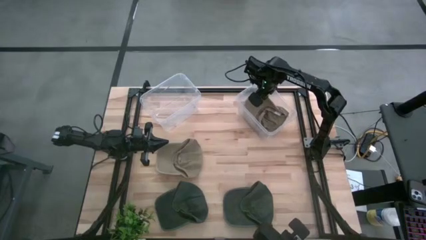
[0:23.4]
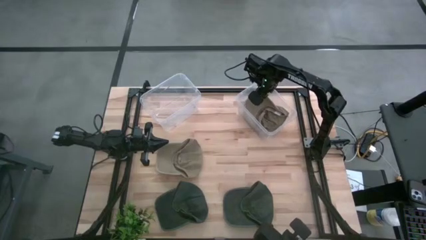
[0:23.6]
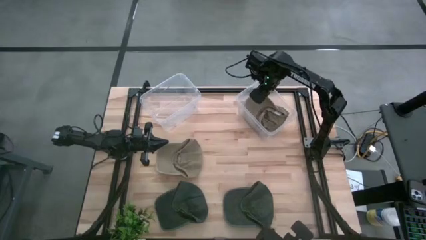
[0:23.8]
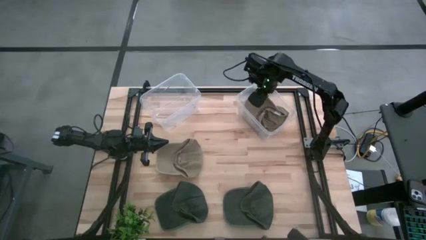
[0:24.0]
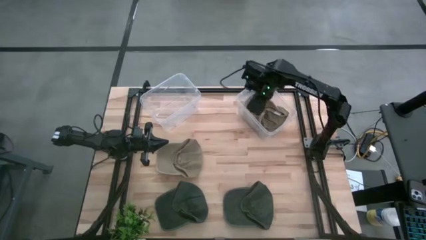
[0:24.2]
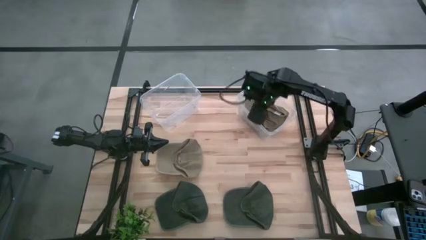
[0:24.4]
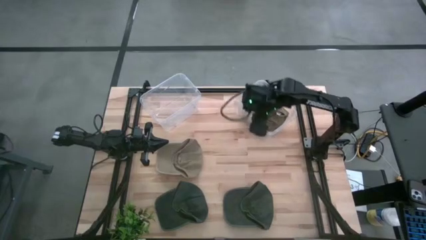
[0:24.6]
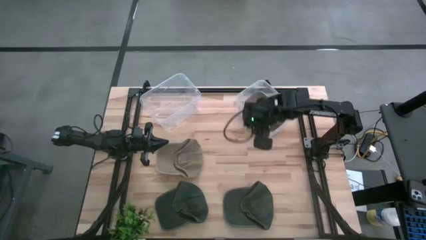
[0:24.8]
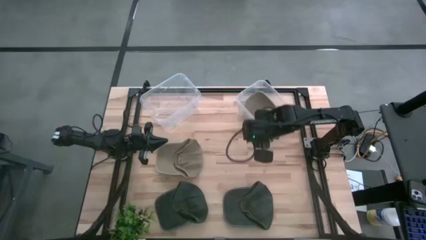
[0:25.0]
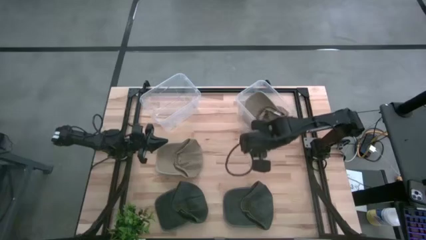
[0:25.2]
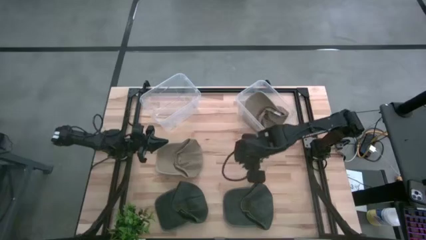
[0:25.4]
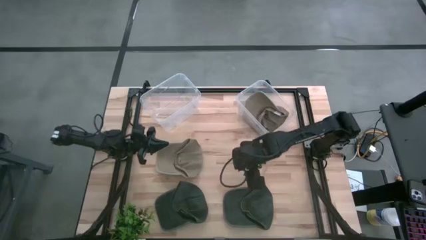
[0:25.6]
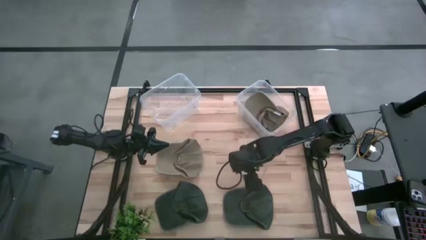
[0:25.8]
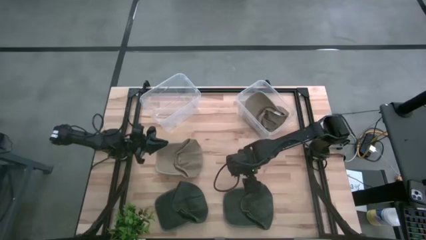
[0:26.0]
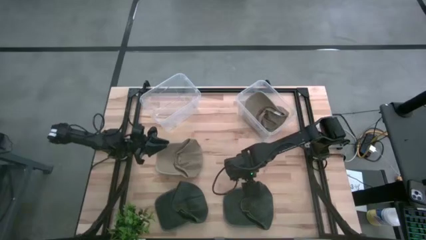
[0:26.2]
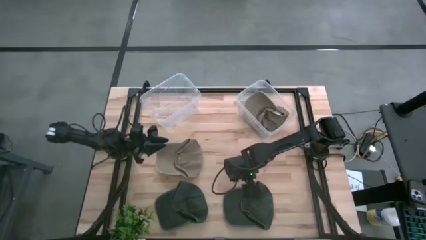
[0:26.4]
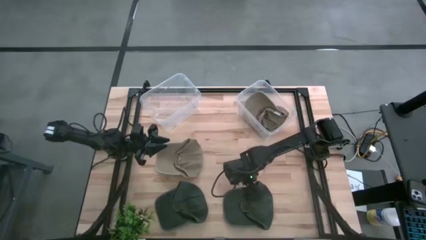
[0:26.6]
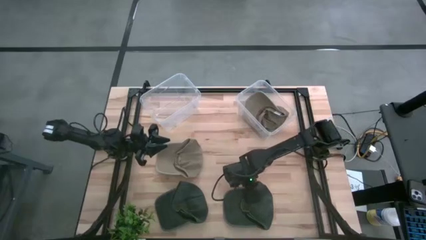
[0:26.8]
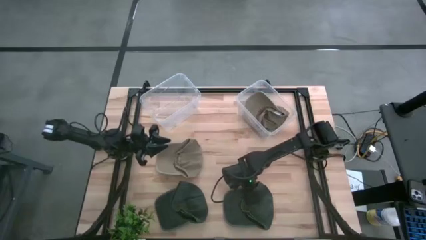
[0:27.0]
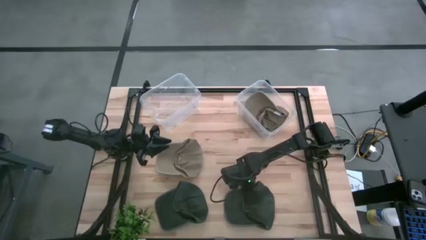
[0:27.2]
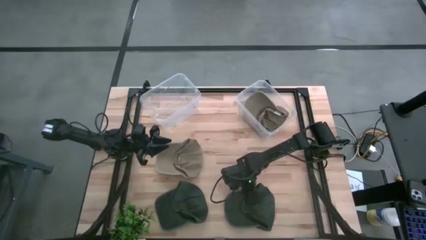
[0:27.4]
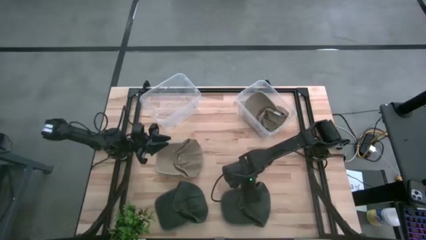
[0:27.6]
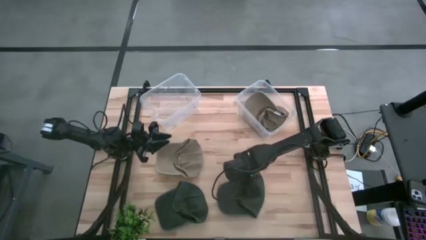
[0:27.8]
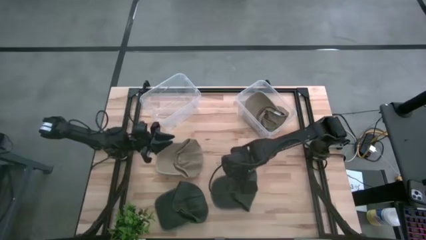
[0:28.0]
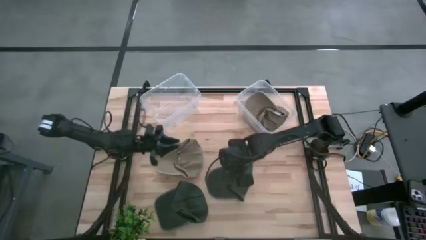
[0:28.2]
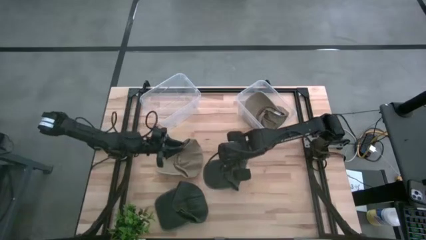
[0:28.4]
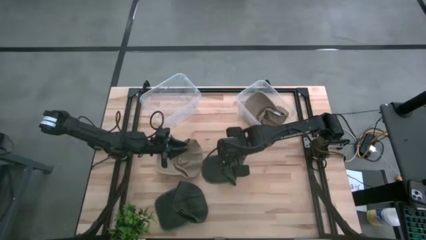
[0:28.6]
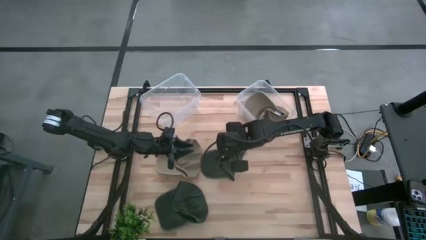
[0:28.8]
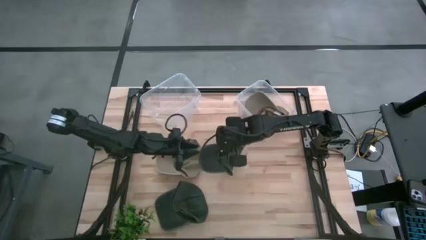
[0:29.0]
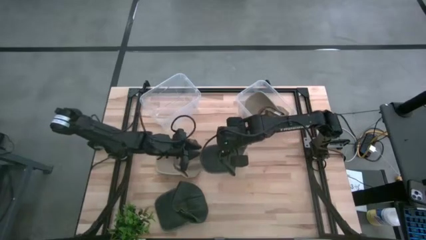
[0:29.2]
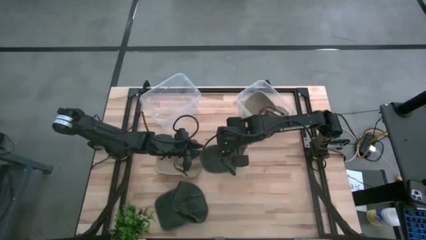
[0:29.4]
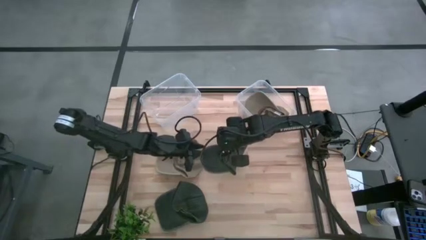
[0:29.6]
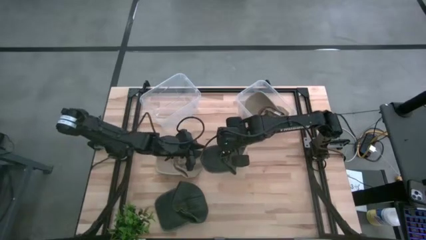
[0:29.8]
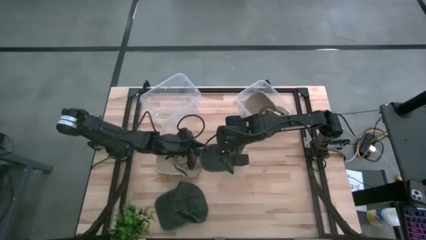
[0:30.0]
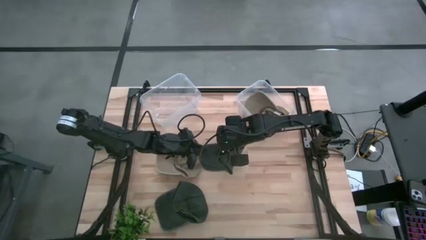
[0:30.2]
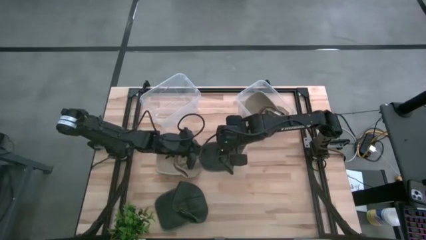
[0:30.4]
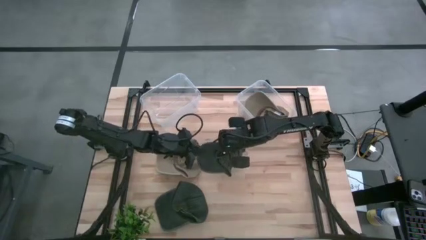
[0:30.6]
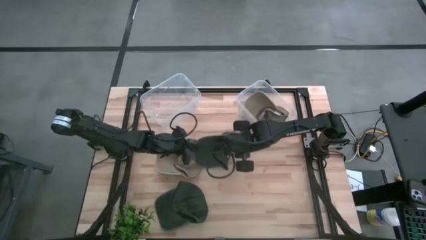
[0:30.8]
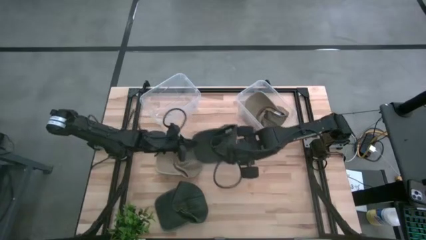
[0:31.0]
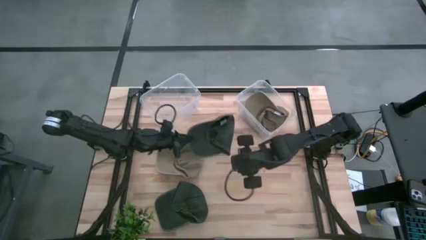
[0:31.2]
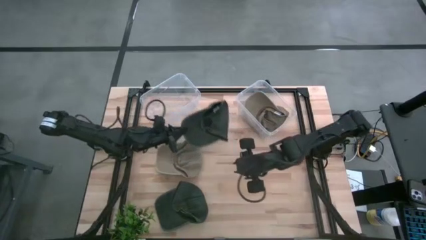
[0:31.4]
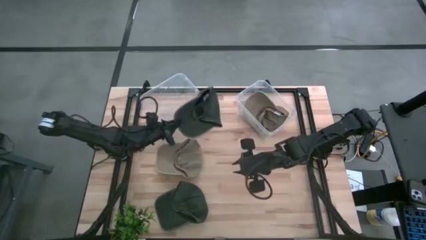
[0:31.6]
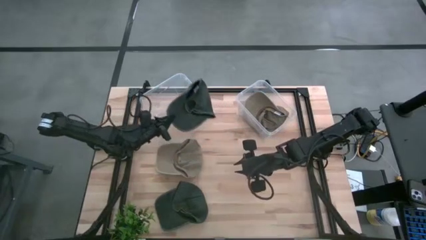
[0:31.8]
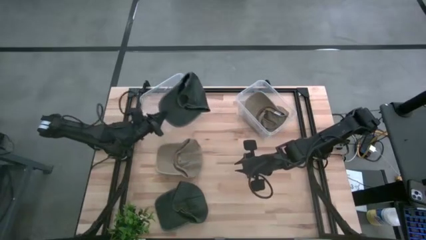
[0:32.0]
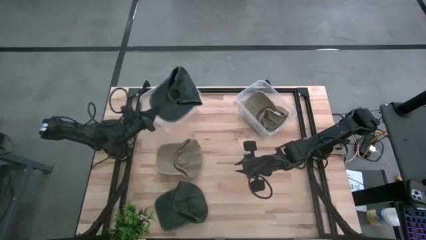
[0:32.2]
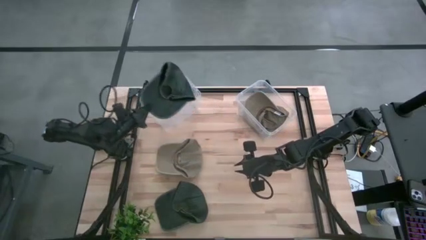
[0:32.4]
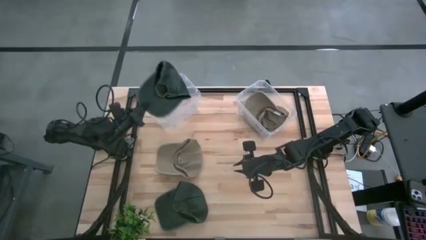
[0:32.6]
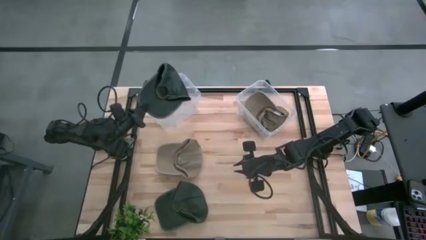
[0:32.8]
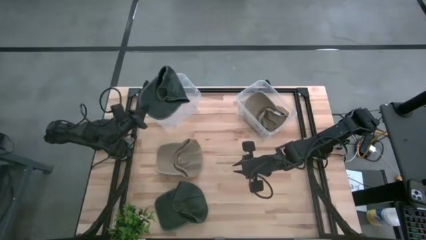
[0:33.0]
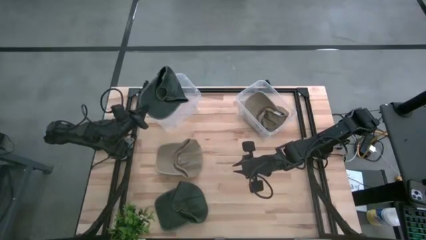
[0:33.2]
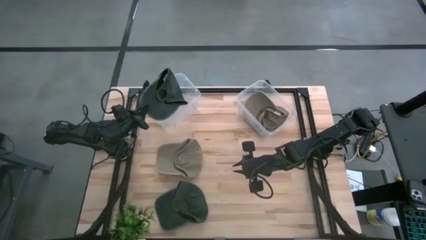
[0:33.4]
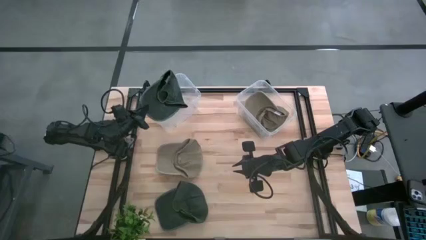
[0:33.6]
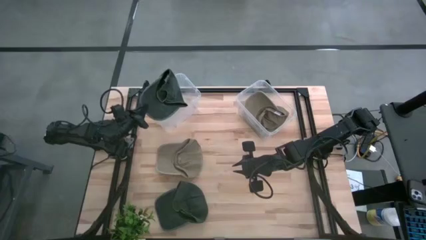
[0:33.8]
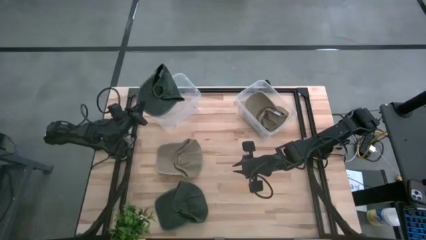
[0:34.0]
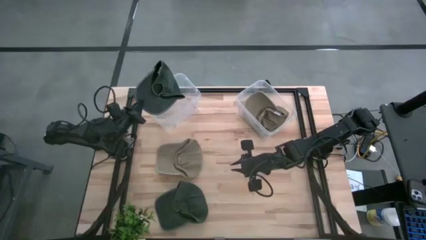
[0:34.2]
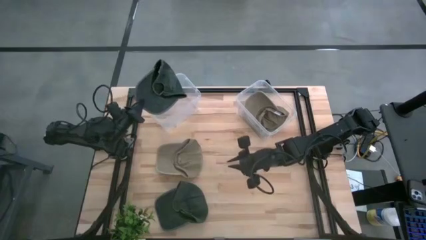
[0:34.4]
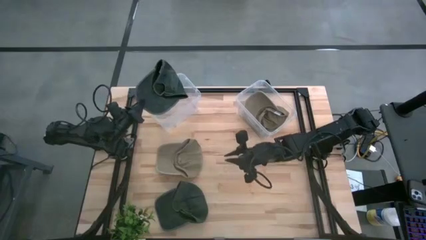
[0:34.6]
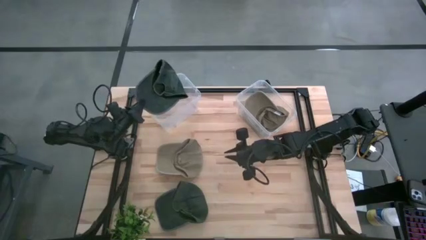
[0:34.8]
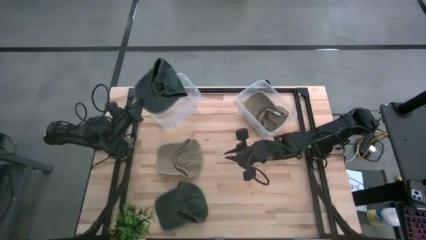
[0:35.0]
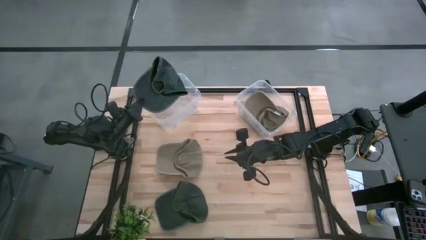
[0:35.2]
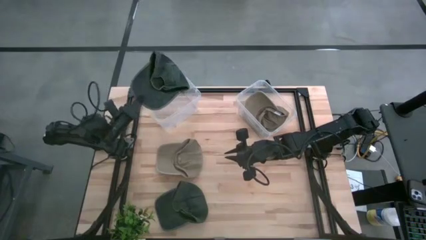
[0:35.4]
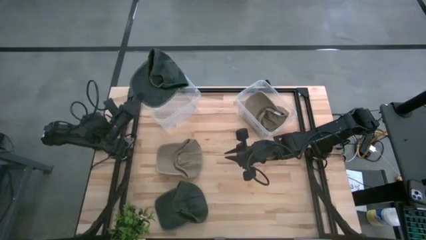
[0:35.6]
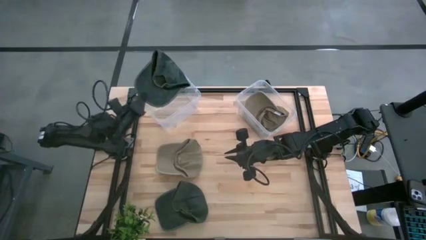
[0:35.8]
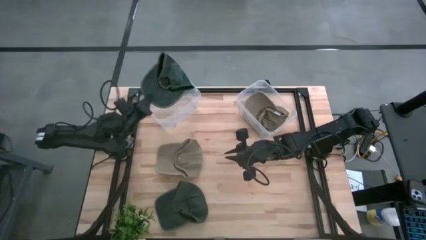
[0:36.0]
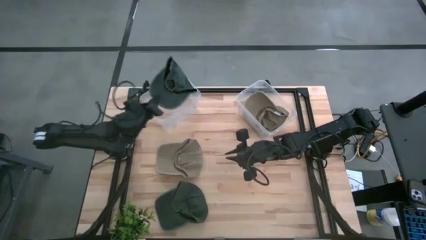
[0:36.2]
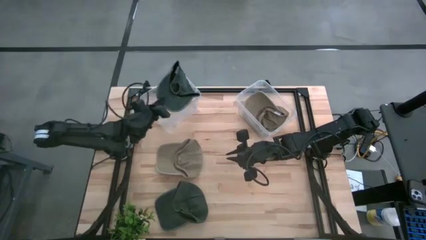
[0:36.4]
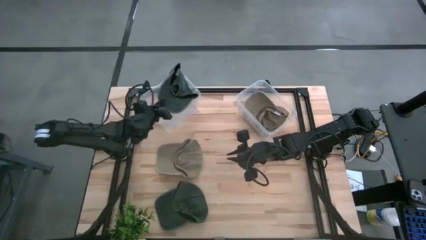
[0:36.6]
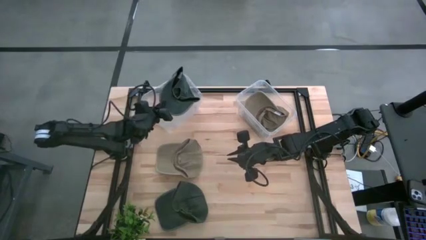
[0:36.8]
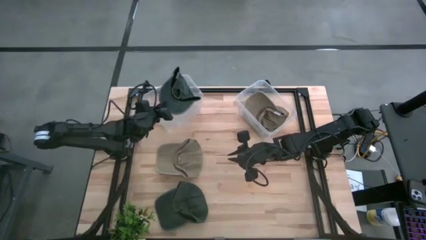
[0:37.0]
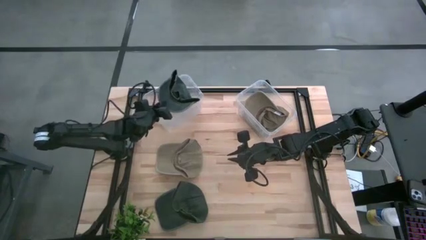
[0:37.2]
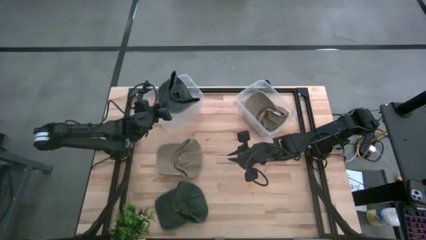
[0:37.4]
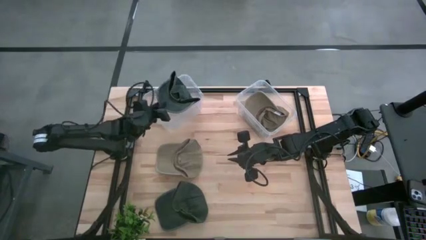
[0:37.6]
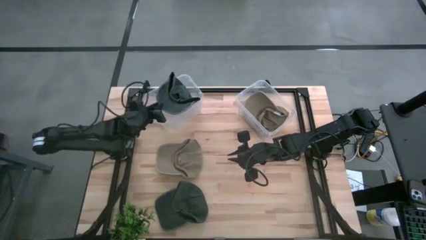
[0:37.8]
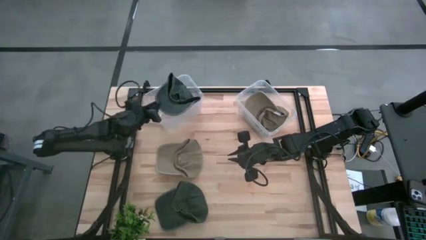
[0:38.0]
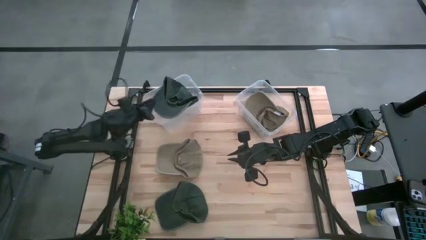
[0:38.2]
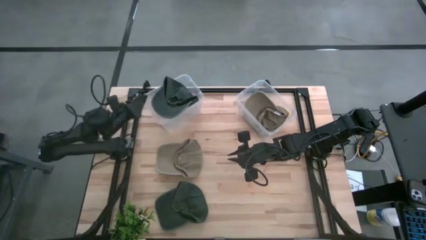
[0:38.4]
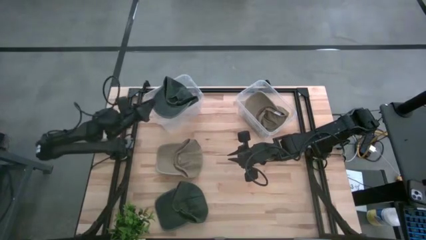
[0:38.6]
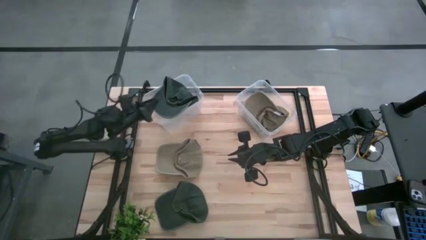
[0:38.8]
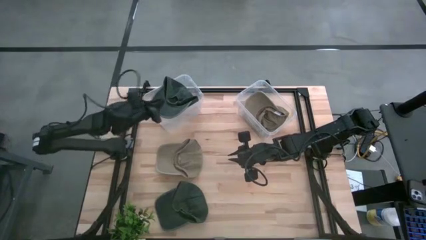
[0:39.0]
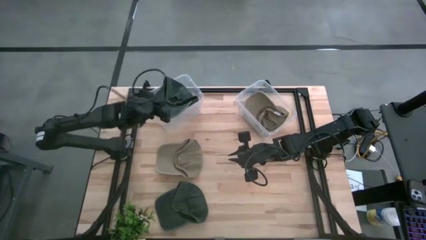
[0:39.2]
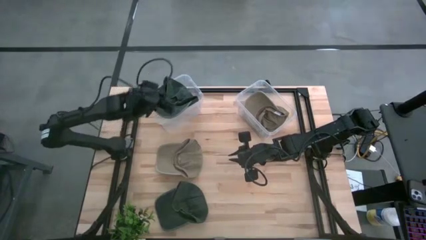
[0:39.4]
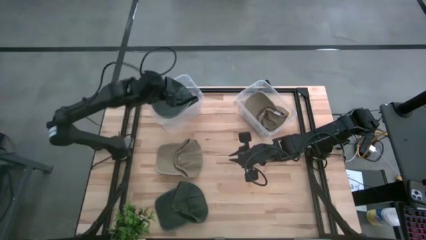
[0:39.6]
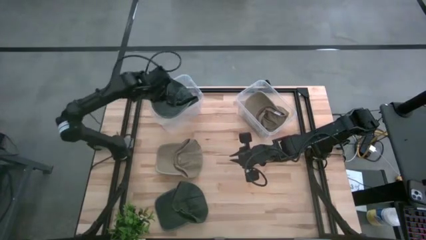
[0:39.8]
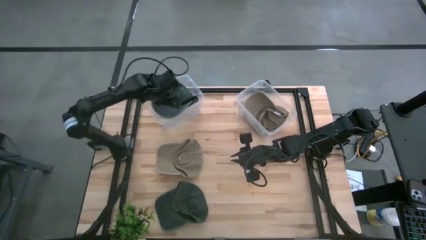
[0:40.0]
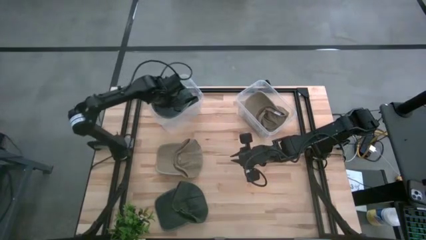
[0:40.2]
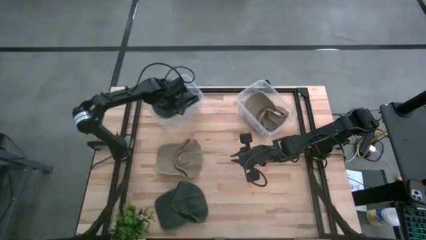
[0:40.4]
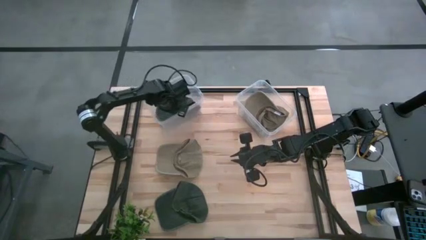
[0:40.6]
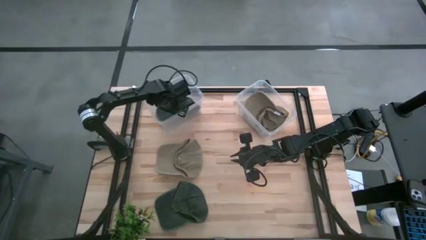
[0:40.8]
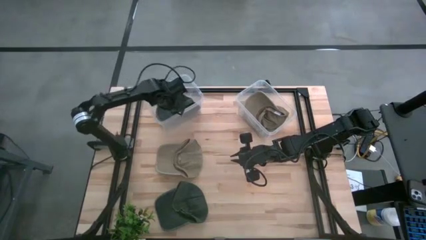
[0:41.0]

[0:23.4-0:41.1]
Task: Pick & Place hat
Put the right black cap into the left transparent bin
